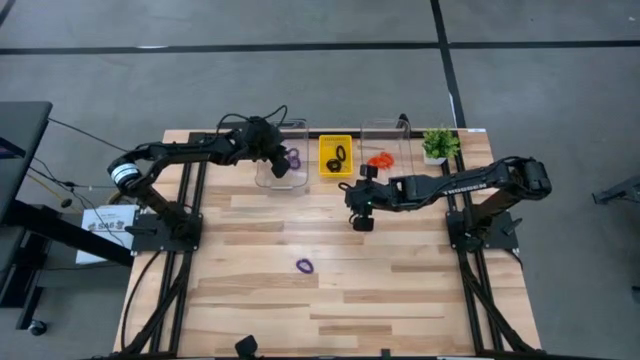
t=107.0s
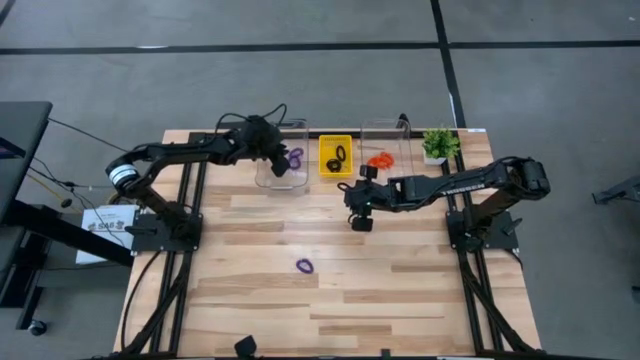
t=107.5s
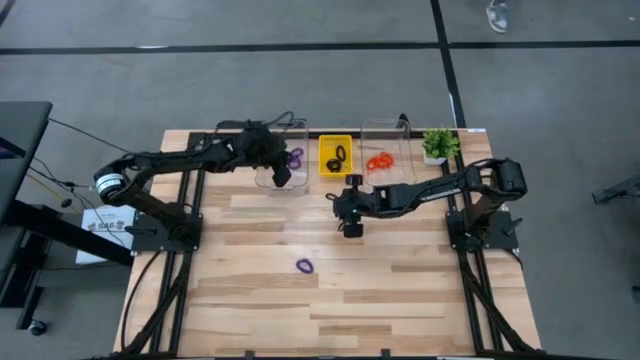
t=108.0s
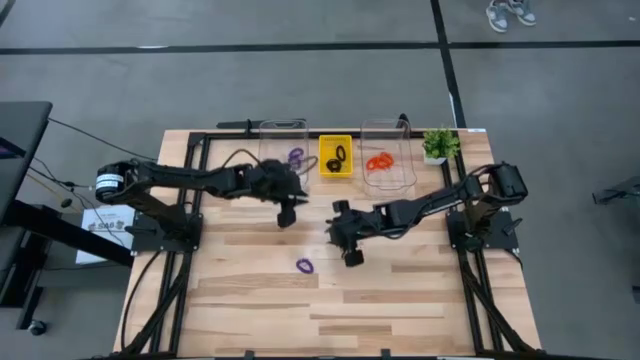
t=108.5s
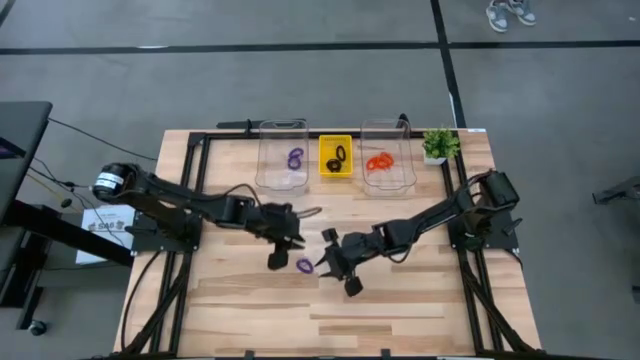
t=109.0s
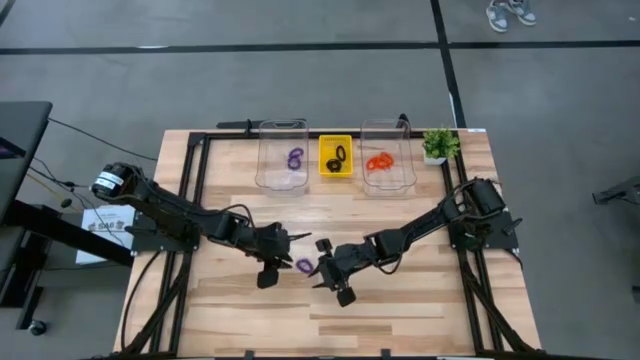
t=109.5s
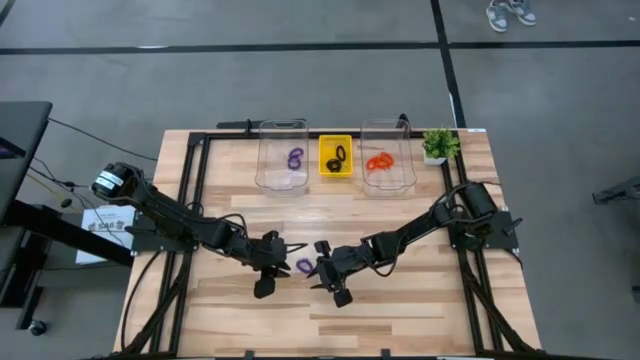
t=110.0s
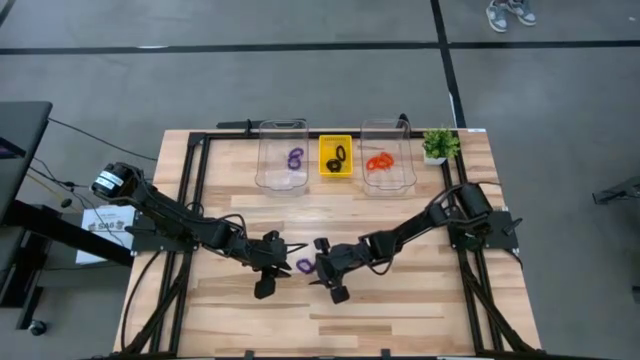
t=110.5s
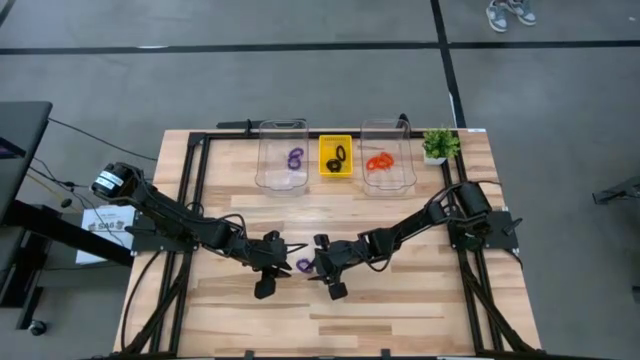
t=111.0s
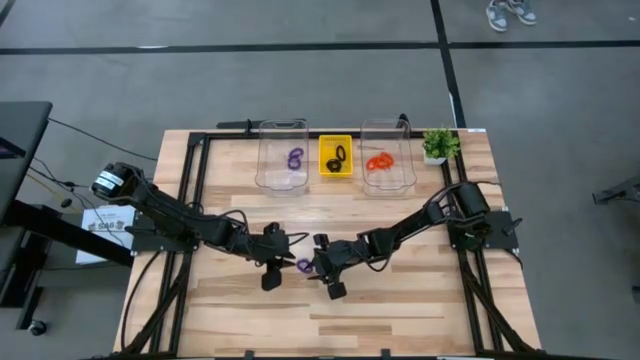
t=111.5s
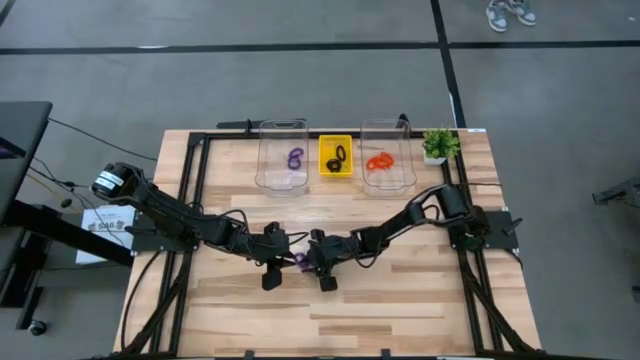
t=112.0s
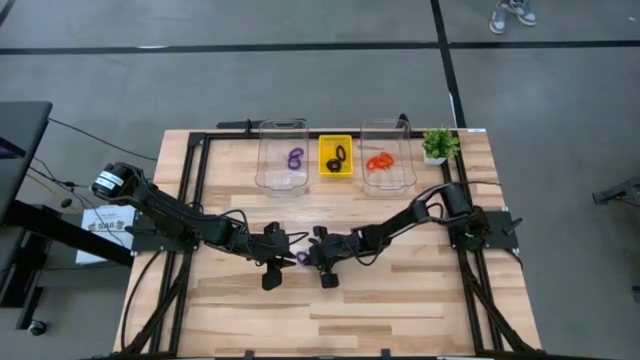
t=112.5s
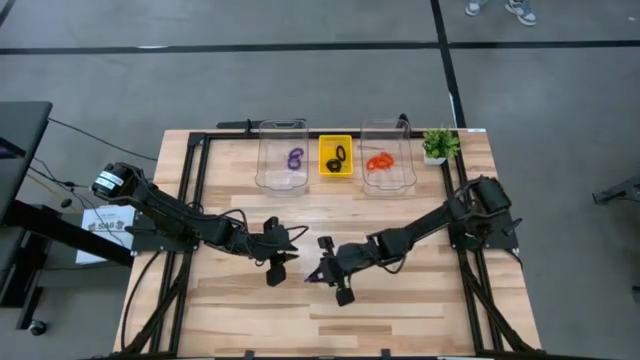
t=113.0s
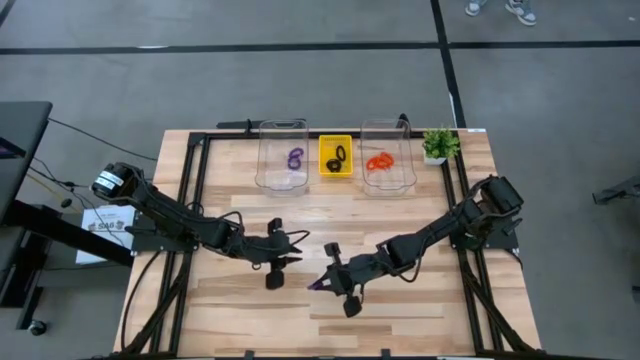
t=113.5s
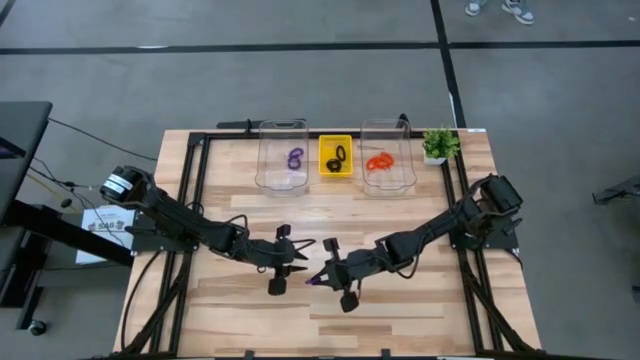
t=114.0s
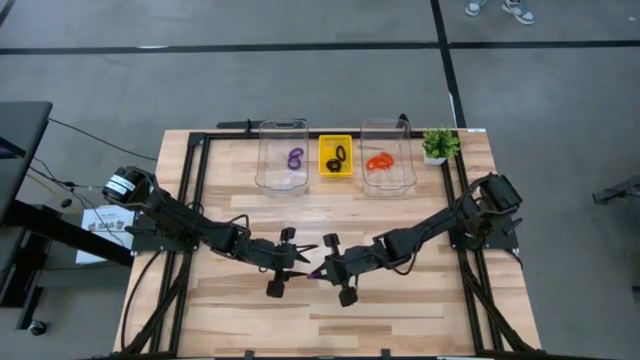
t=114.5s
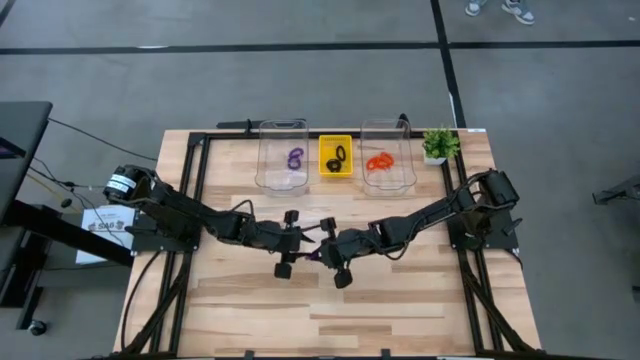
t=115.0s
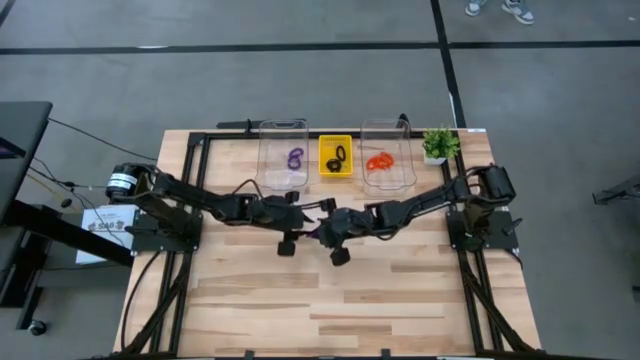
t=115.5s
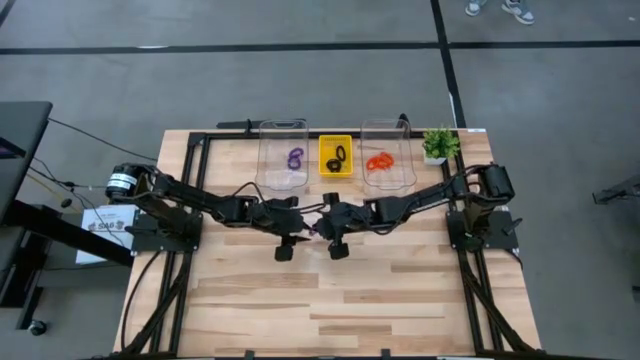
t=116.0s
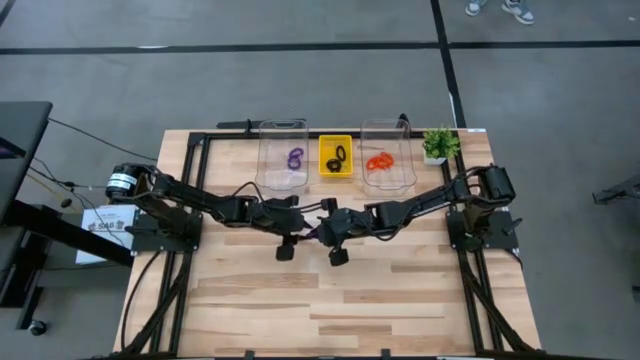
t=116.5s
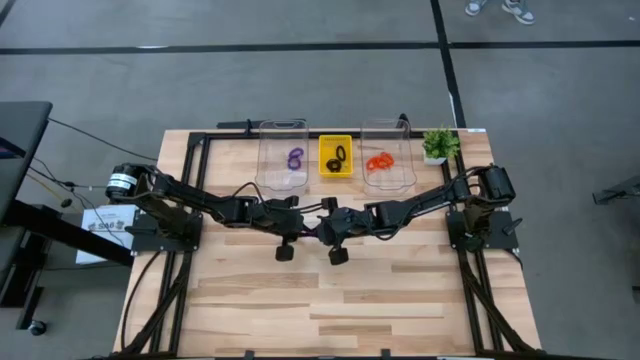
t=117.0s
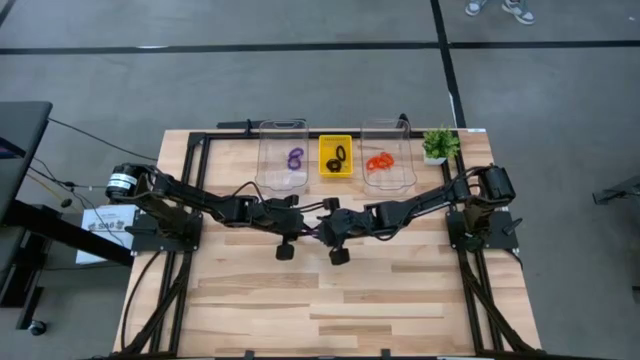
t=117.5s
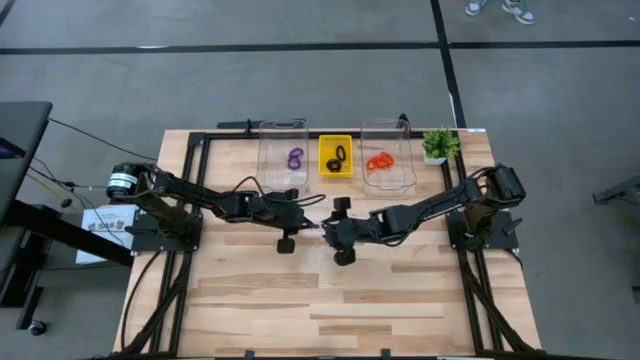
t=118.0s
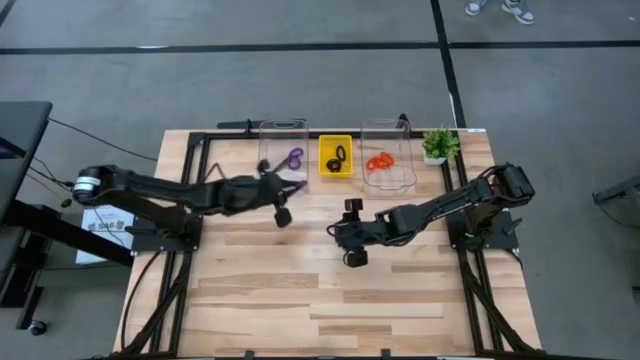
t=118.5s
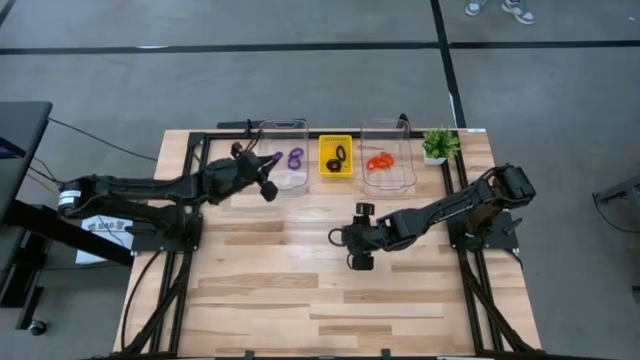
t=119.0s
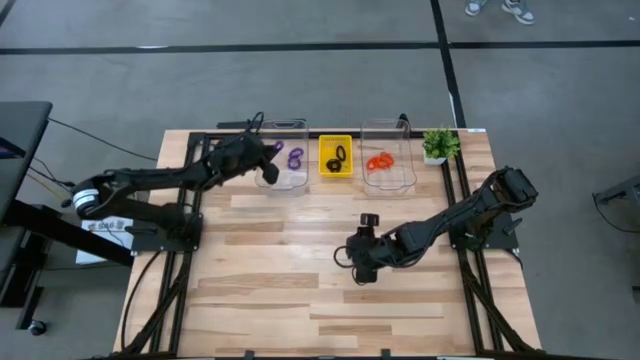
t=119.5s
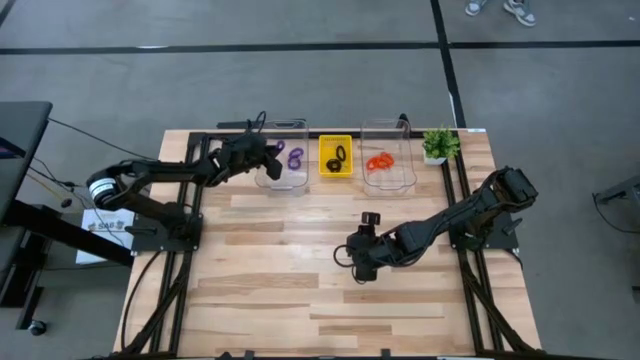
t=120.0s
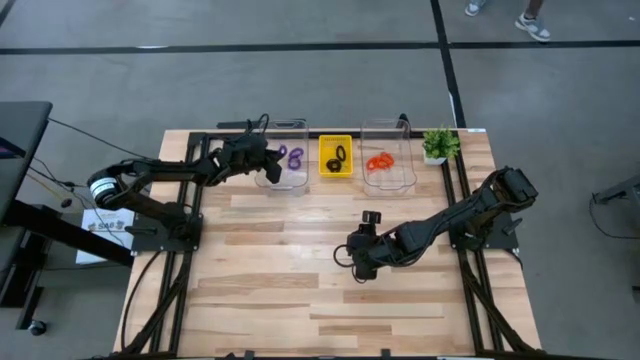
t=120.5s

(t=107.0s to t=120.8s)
Task: Sort spring keychains
Put the purple spring keychain into the left transparent bin

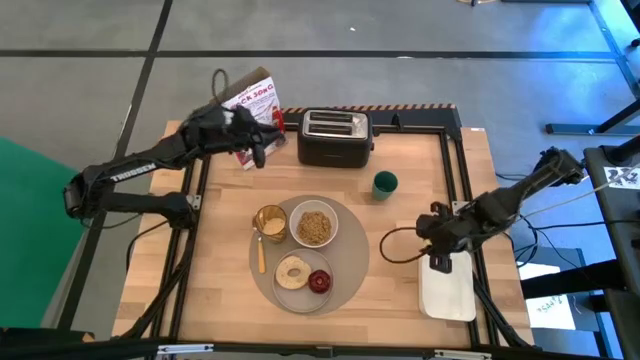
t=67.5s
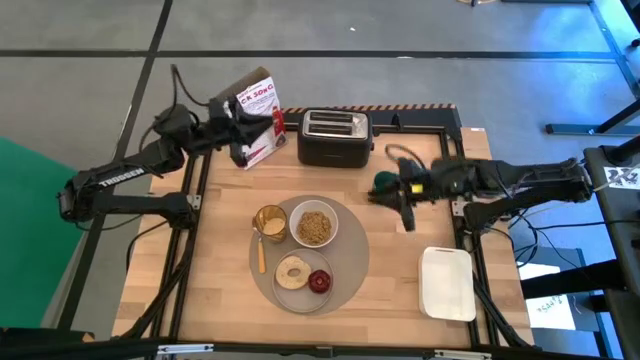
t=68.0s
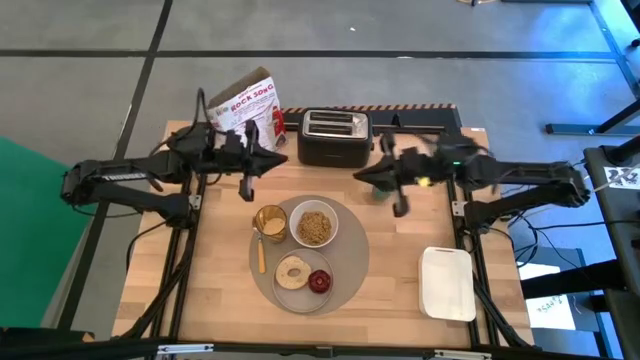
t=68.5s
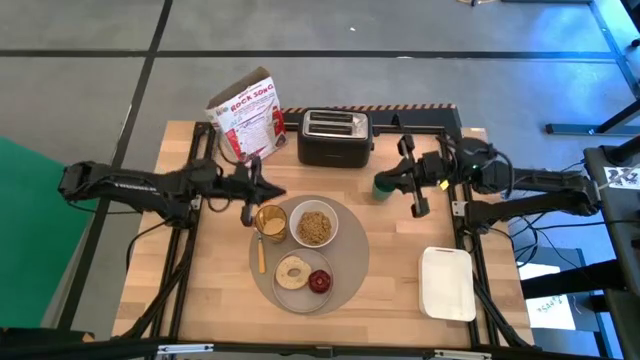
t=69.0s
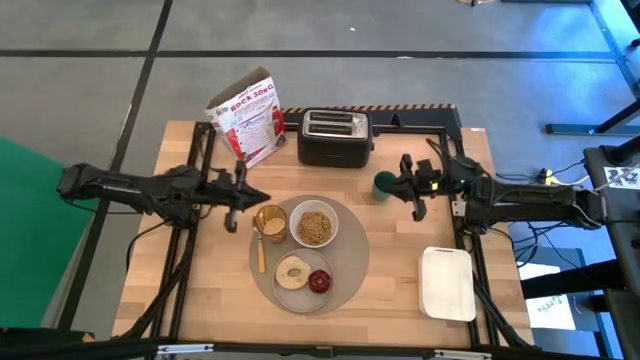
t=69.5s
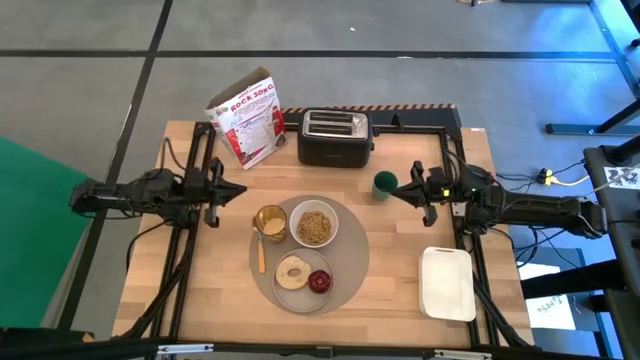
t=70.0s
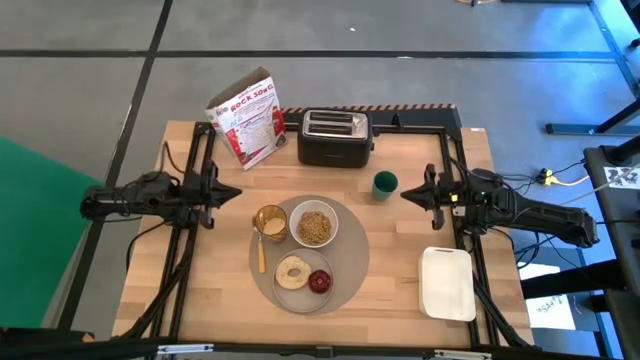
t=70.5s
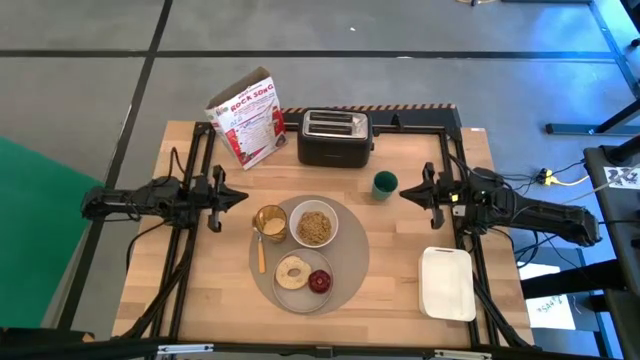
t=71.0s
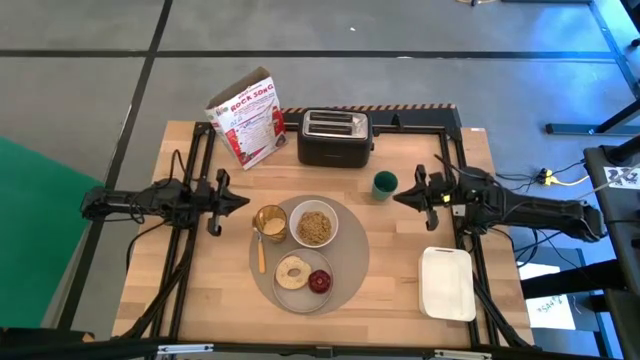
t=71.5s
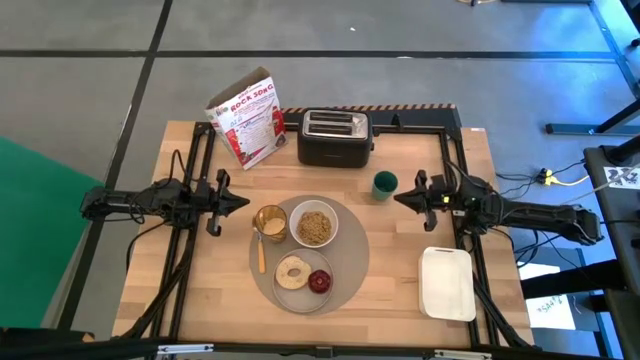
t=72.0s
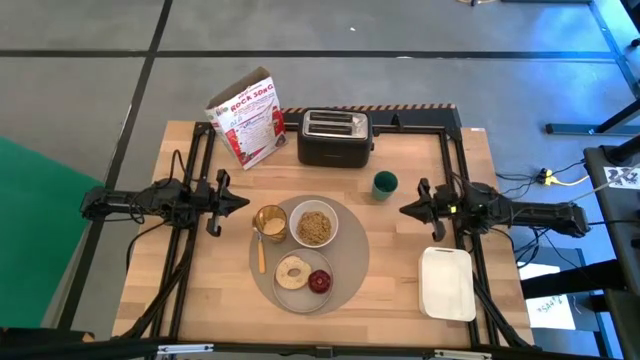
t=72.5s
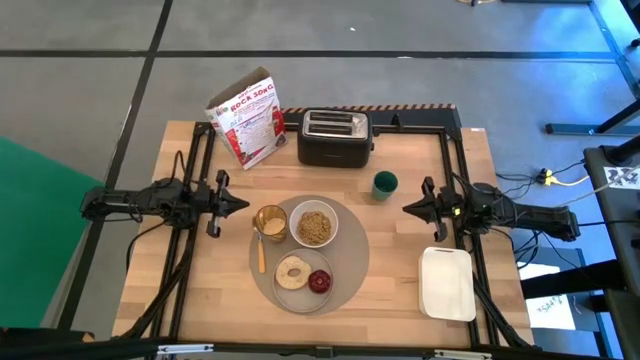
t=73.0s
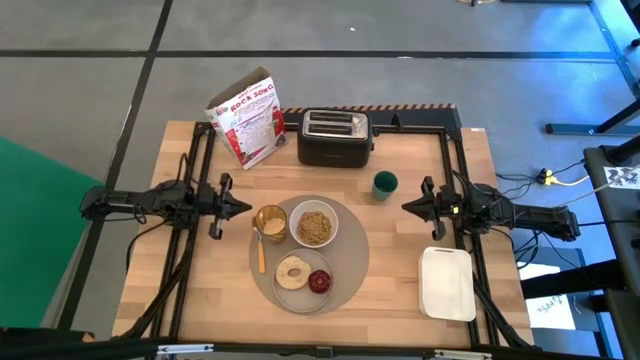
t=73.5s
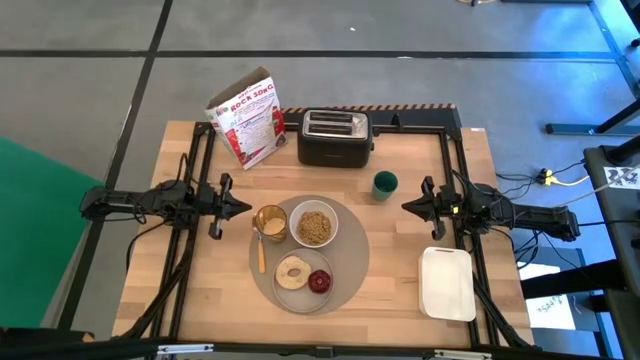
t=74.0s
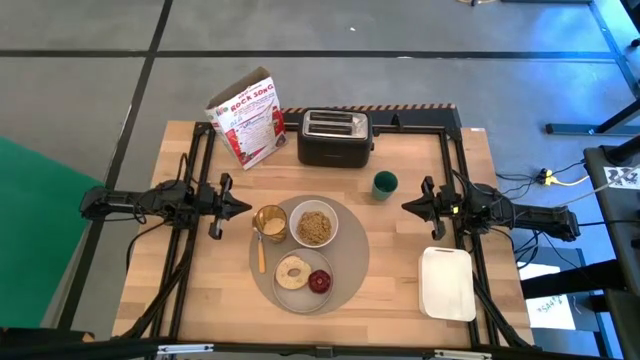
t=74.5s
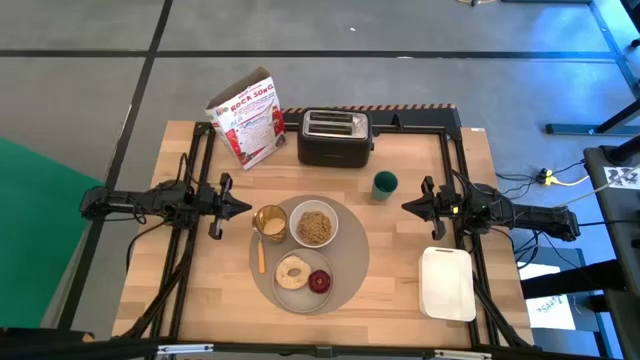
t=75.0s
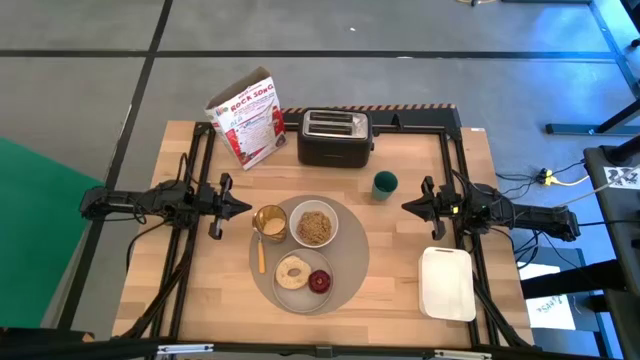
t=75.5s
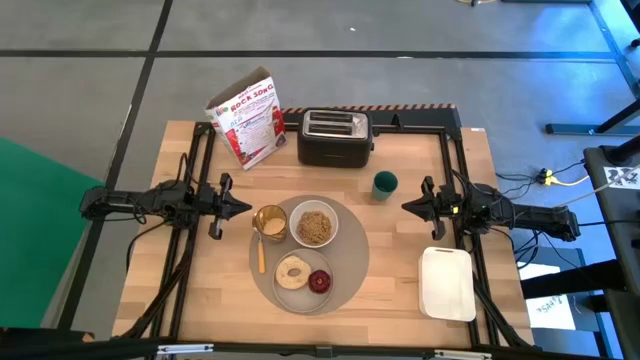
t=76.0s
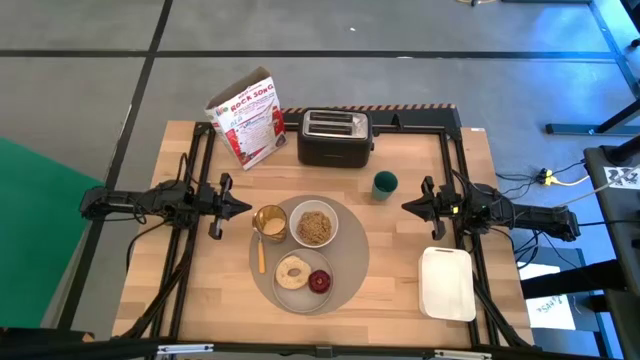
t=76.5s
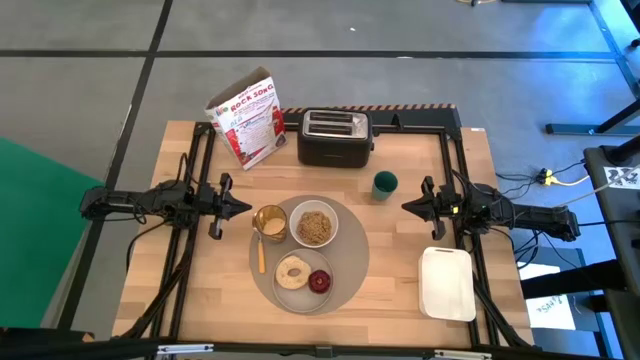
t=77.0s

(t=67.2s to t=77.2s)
Task: Arrange a breakfast setting
Return to Home Position
